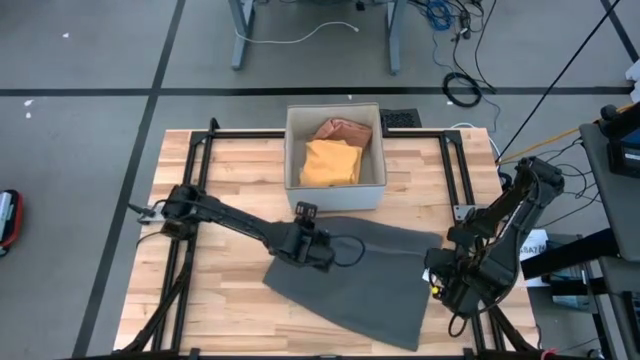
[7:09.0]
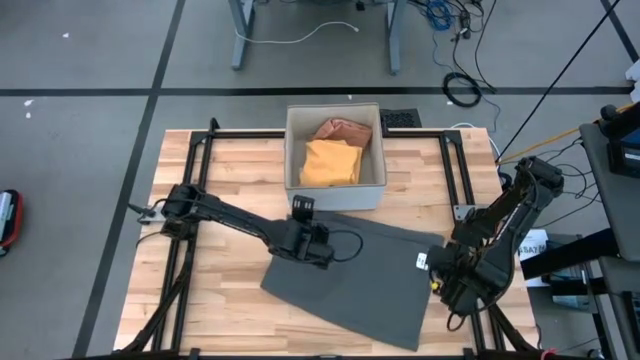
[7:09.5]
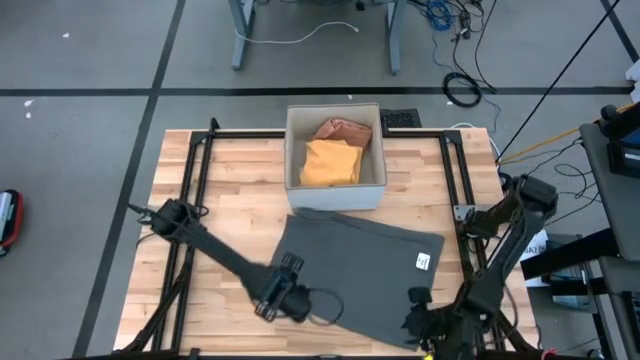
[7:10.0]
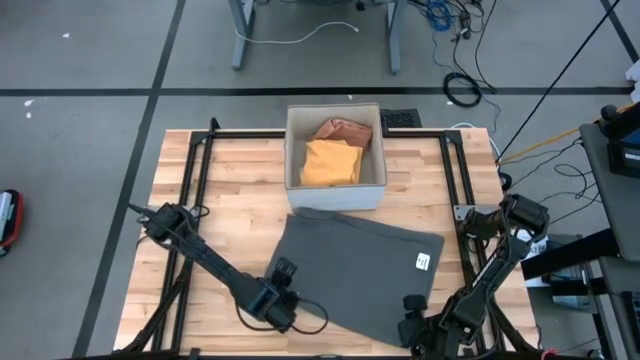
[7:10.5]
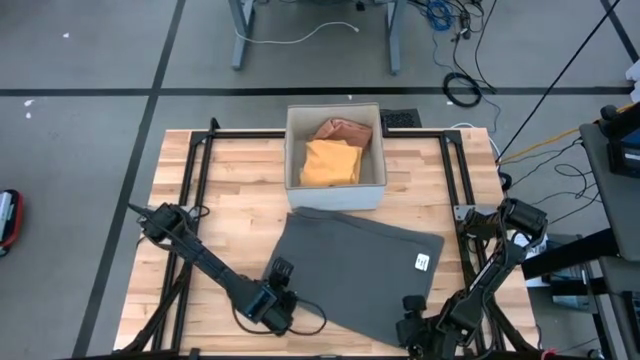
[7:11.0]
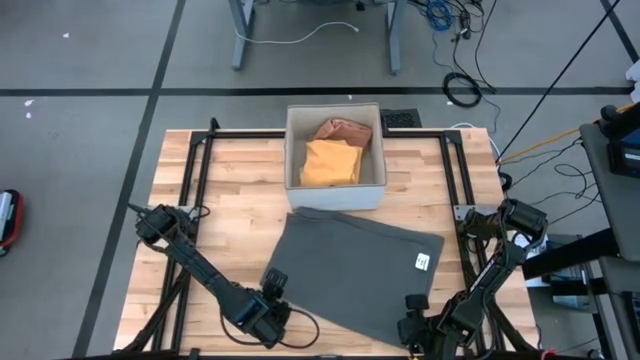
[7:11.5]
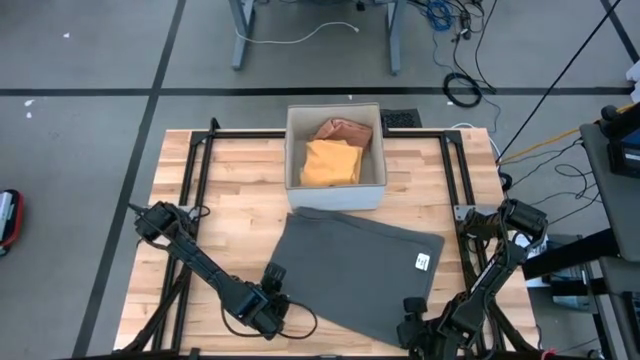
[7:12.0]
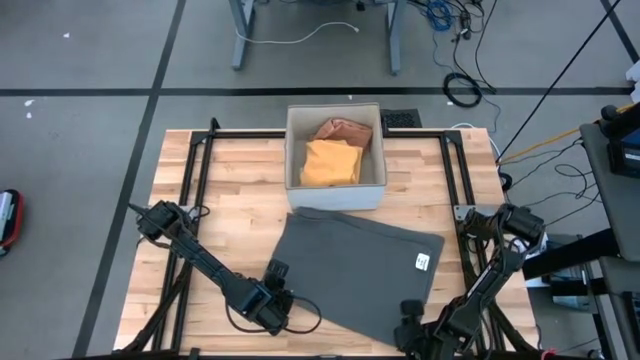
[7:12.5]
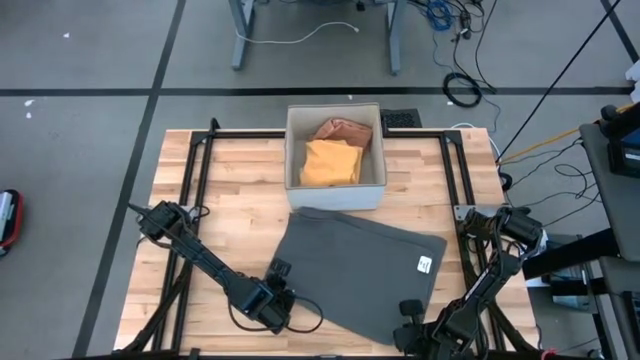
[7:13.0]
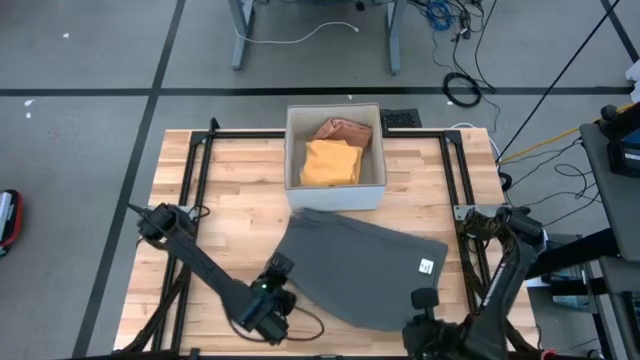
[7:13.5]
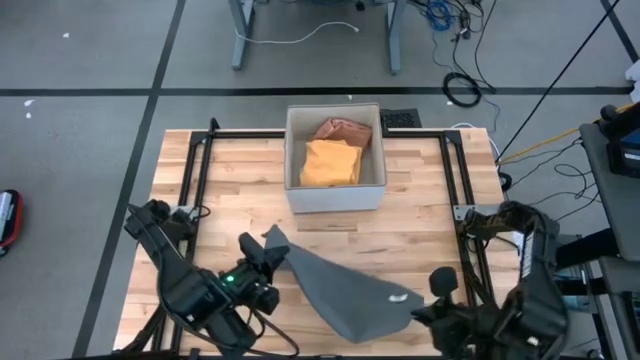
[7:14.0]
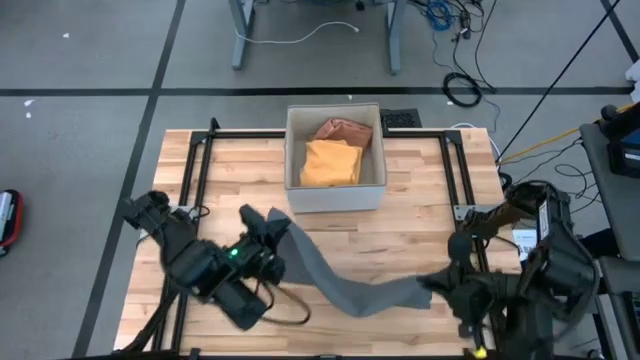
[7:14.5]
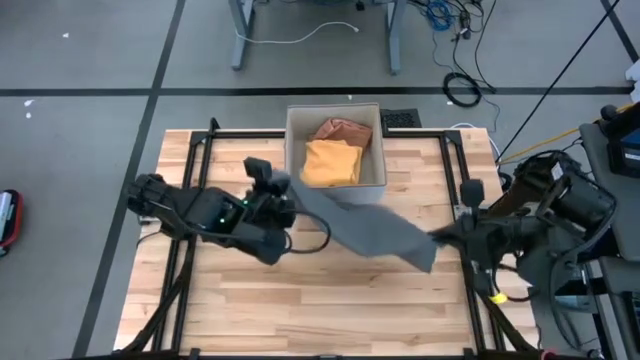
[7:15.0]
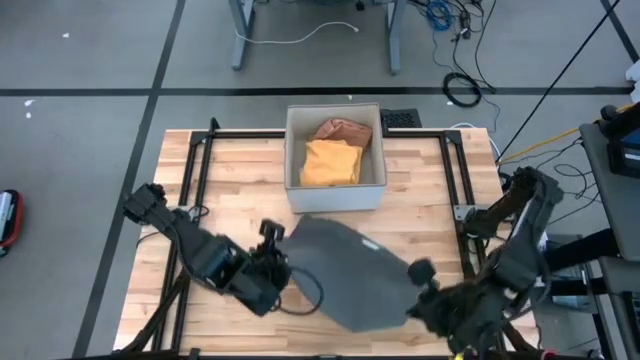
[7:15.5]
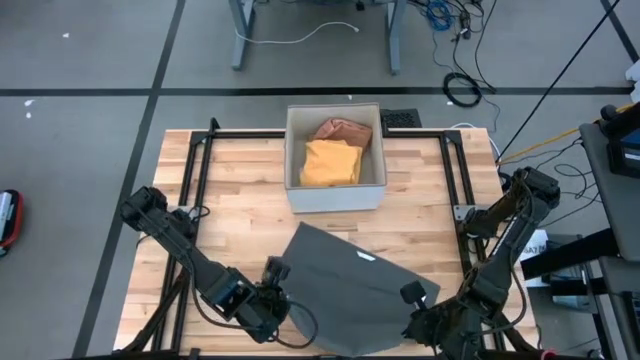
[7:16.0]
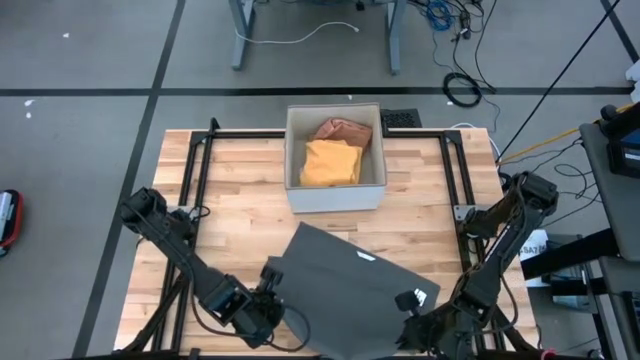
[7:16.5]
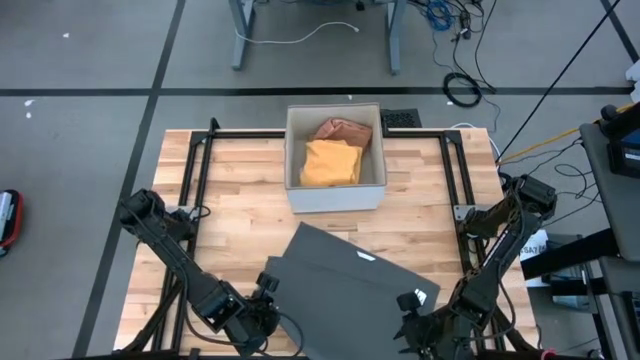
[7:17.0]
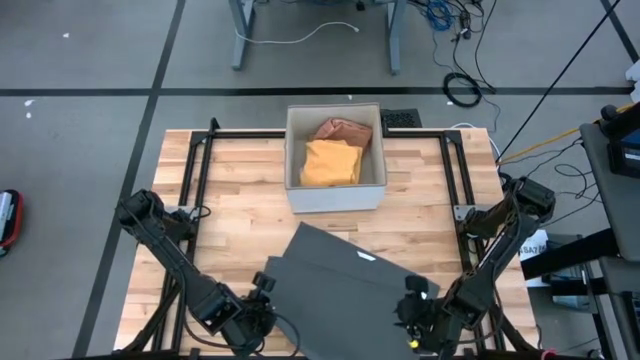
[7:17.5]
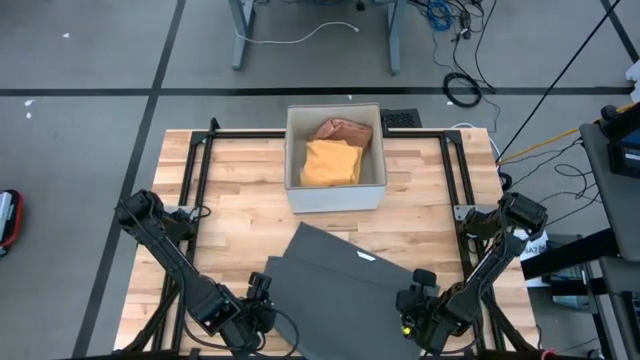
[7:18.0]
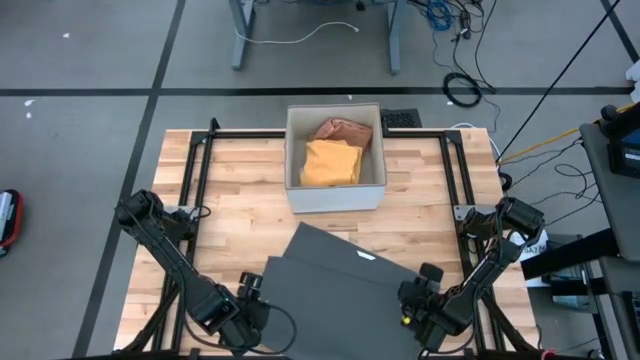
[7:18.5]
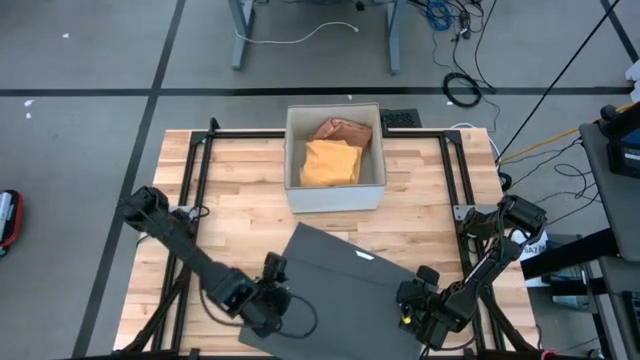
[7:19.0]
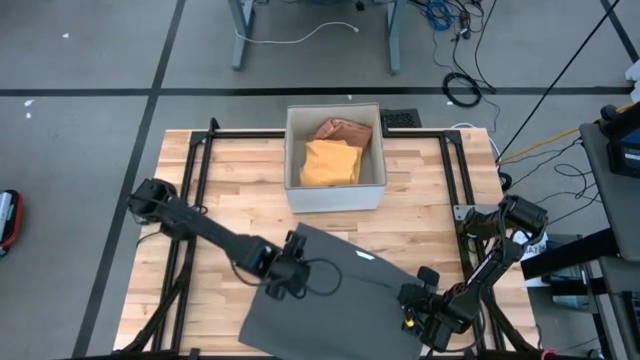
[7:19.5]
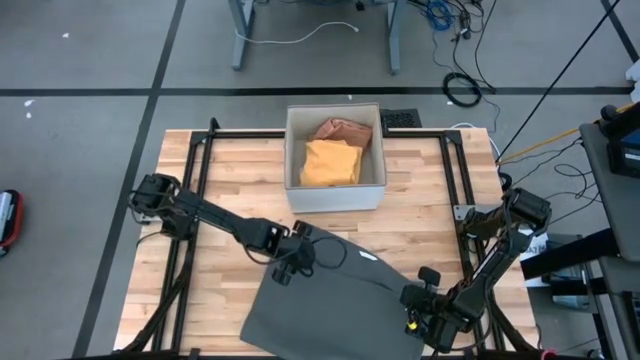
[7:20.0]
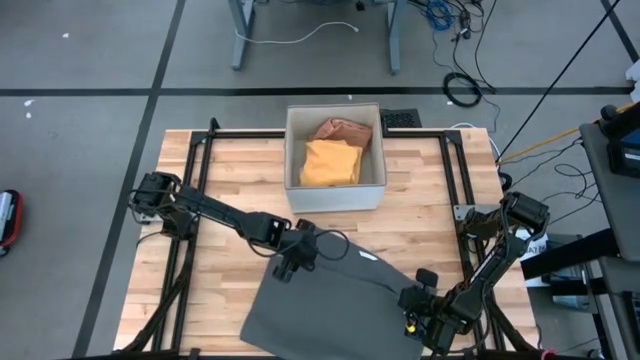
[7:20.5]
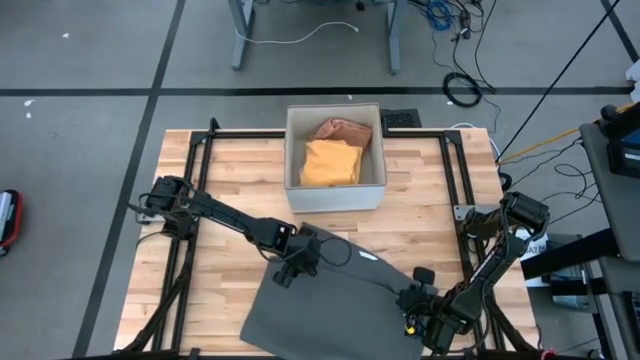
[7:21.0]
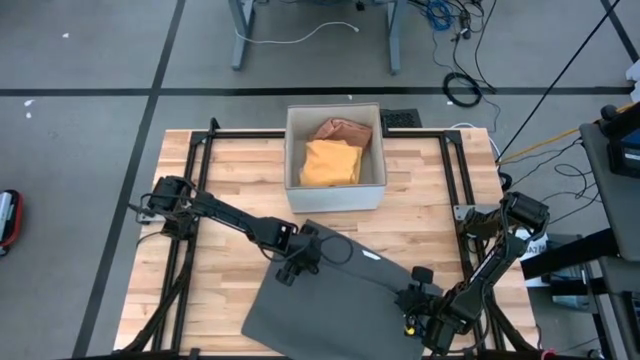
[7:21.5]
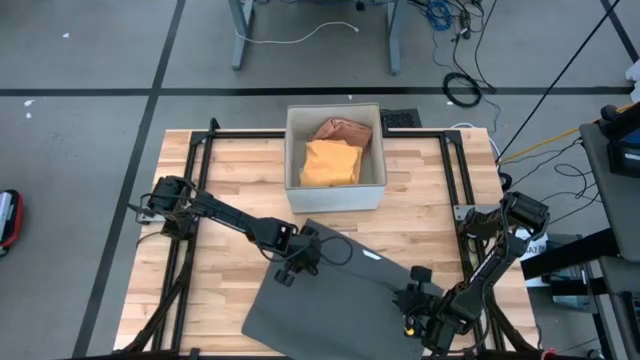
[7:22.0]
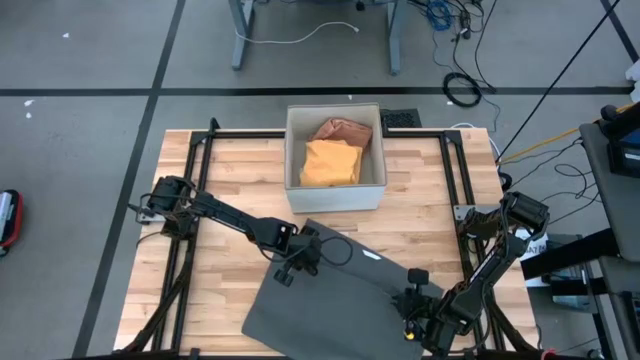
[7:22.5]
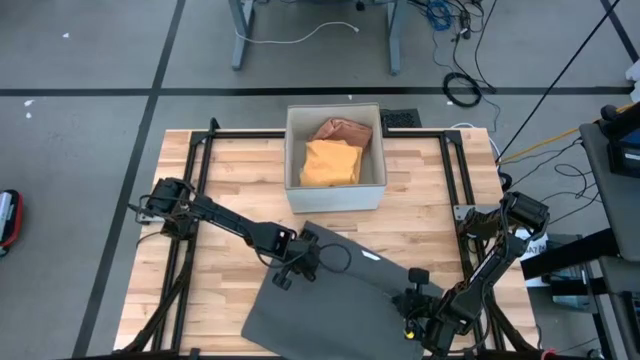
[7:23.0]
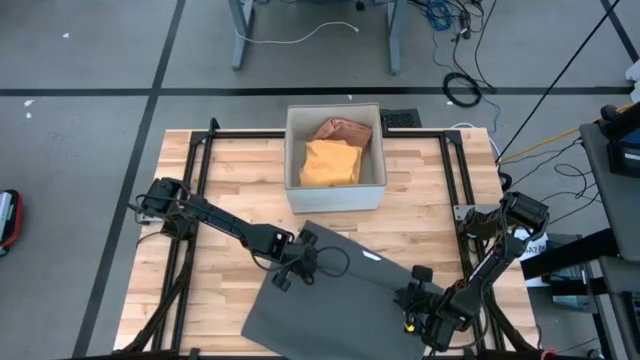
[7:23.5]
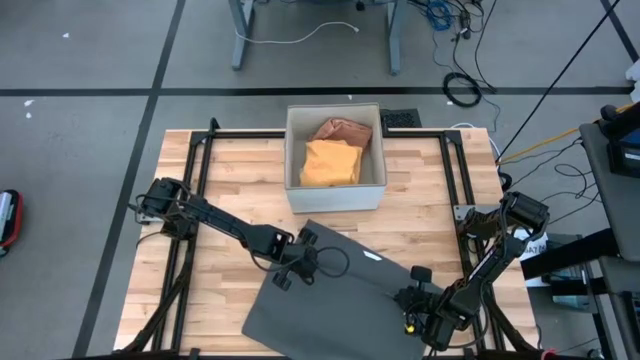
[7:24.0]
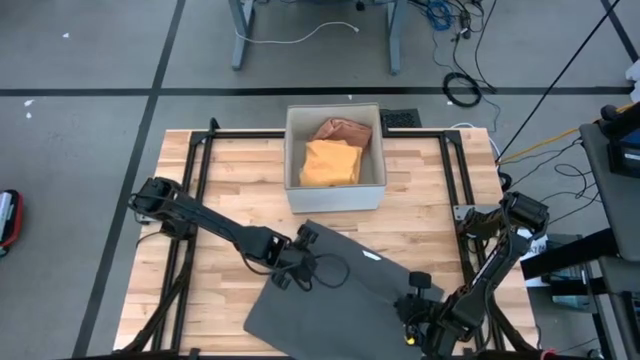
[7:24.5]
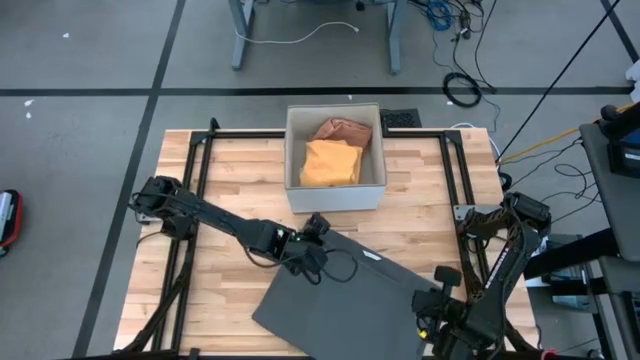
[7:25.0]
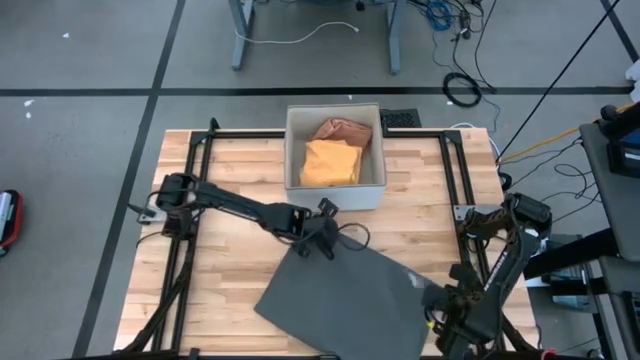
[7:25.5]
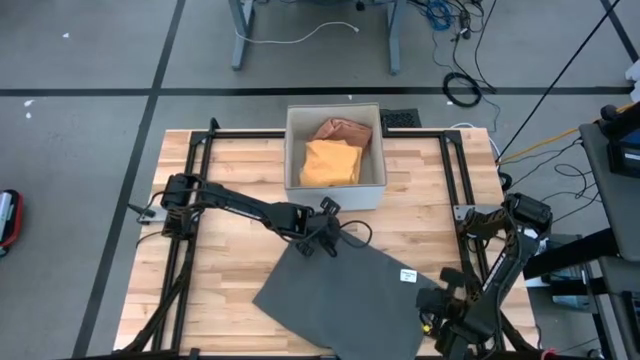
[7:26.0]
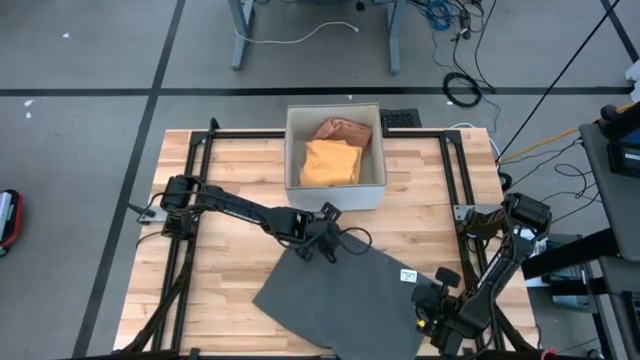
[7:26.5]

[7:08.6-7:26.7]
Task: Fold towel
Fold the gray towel

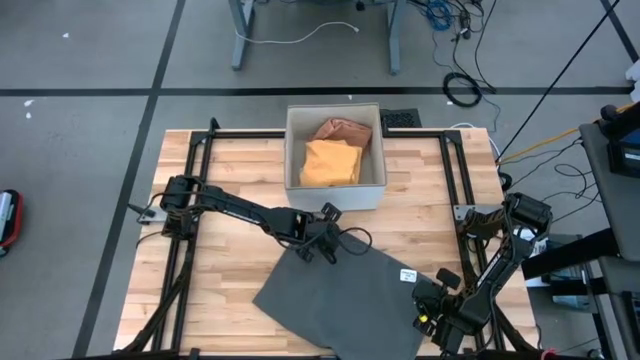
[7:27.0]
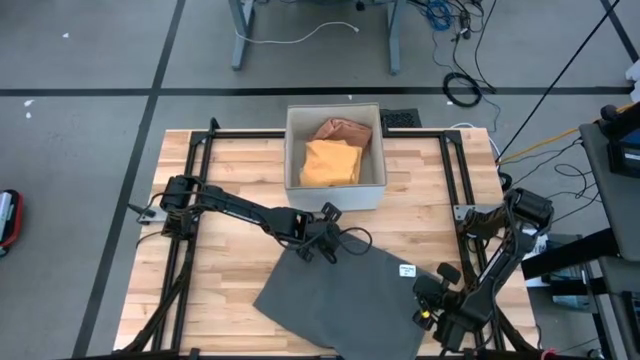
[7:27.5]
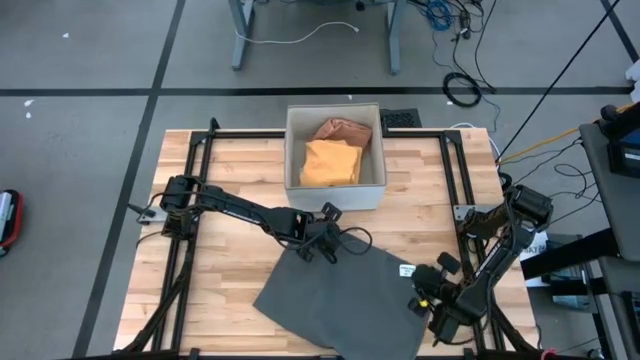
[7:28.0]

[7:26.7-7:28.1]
Fold the gray towel
